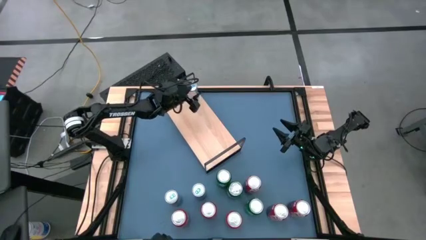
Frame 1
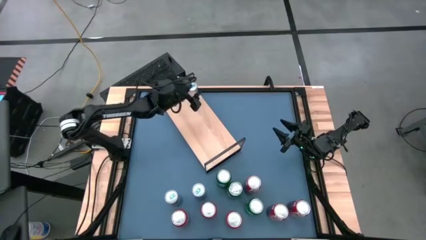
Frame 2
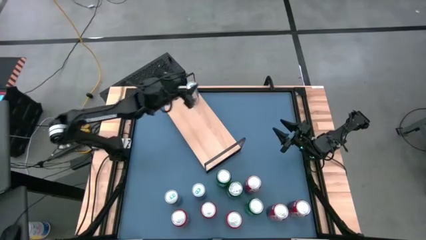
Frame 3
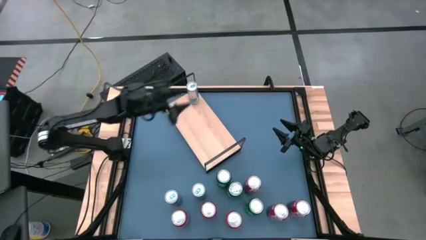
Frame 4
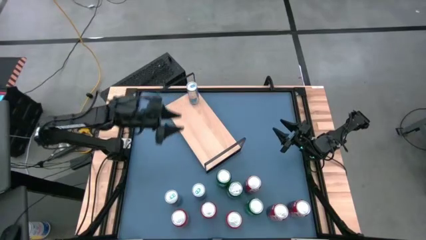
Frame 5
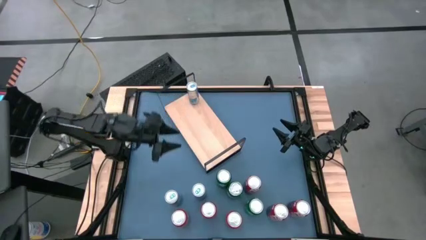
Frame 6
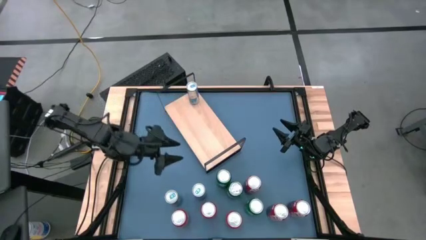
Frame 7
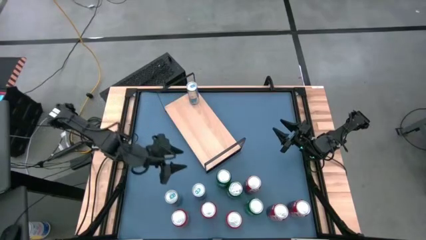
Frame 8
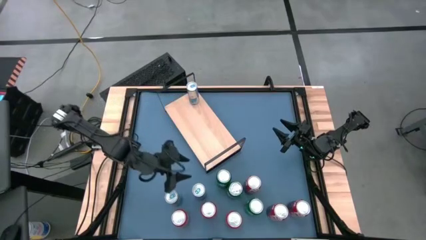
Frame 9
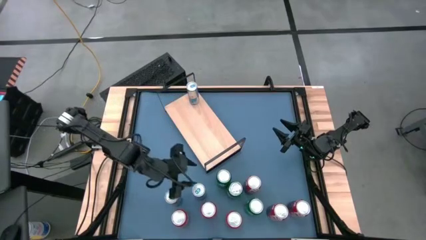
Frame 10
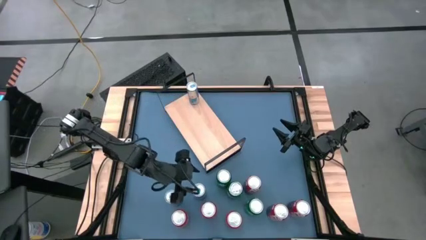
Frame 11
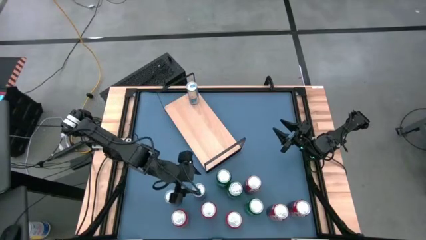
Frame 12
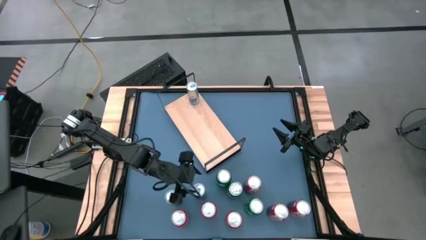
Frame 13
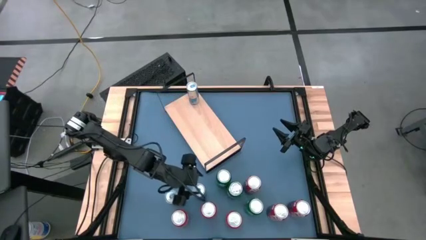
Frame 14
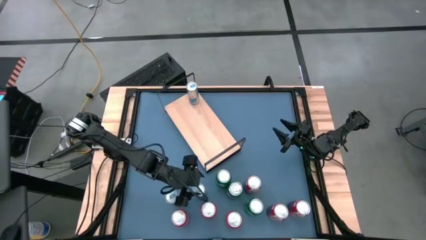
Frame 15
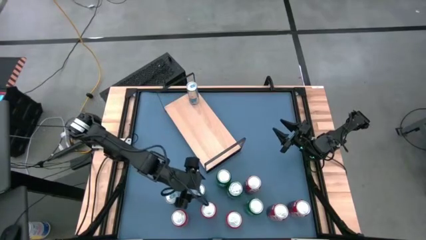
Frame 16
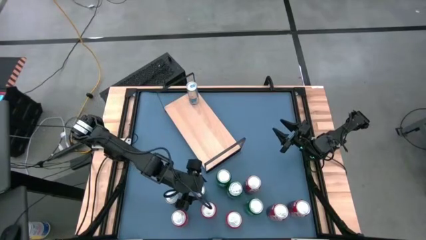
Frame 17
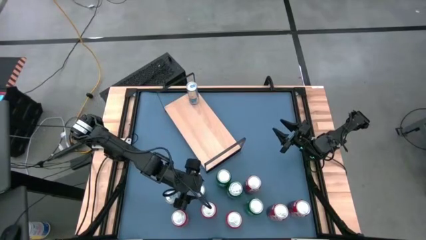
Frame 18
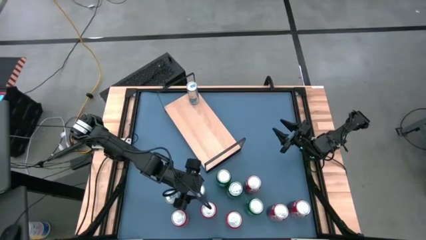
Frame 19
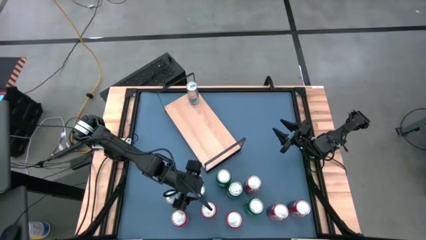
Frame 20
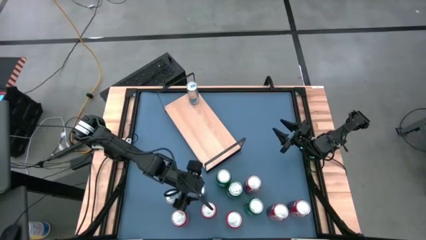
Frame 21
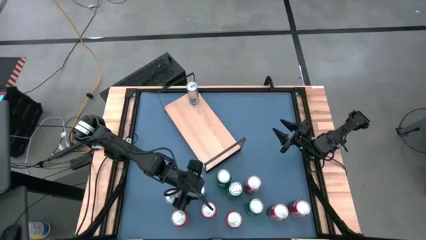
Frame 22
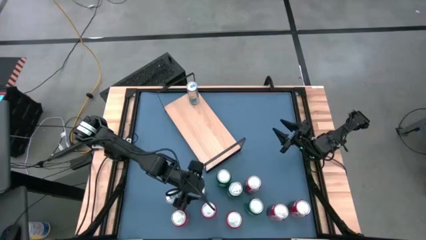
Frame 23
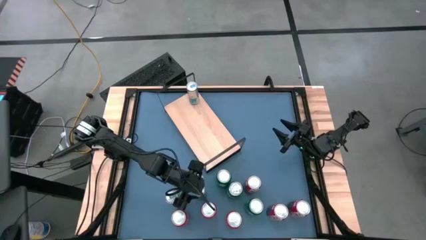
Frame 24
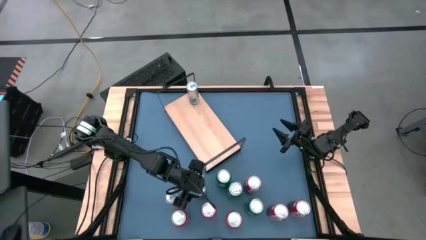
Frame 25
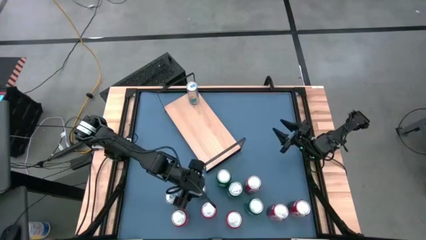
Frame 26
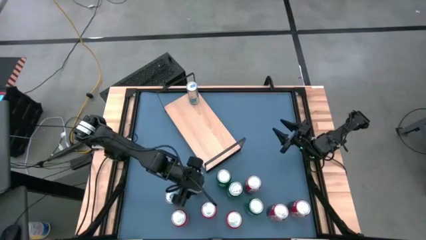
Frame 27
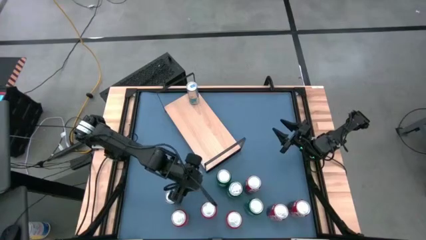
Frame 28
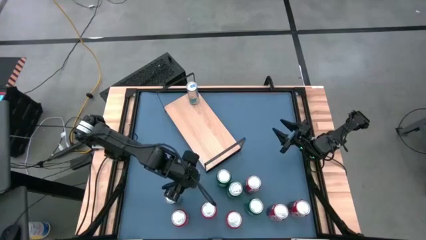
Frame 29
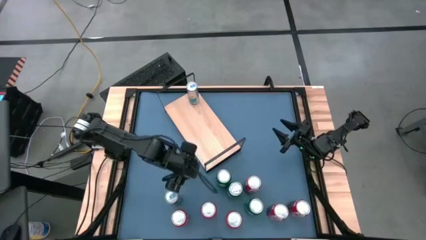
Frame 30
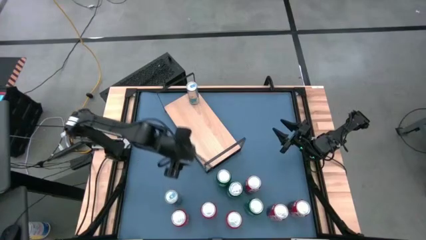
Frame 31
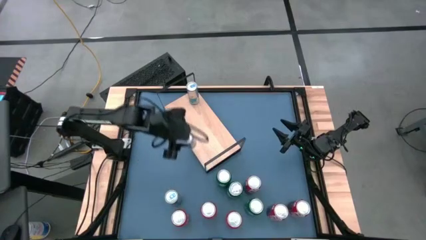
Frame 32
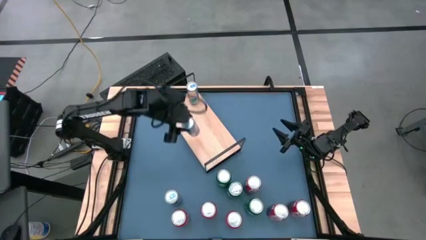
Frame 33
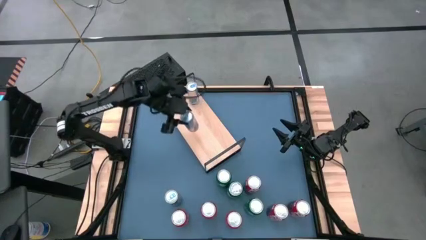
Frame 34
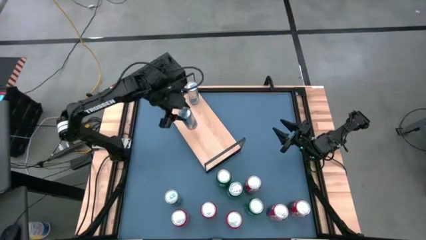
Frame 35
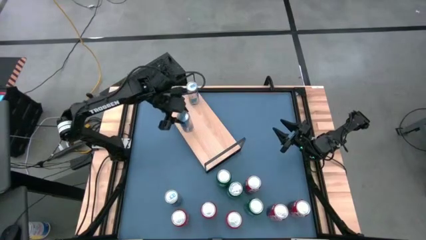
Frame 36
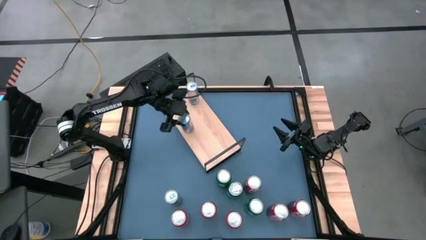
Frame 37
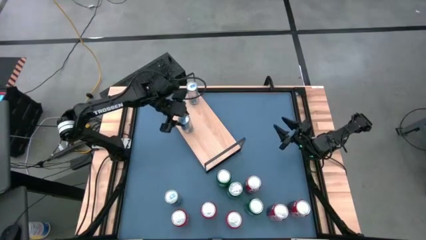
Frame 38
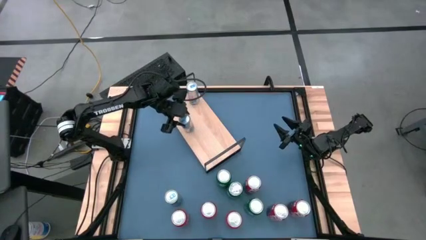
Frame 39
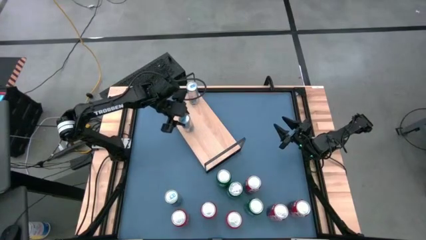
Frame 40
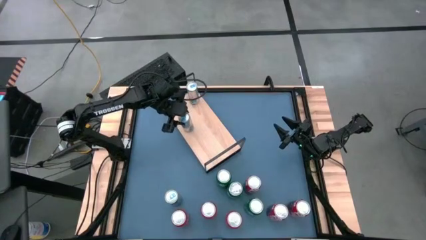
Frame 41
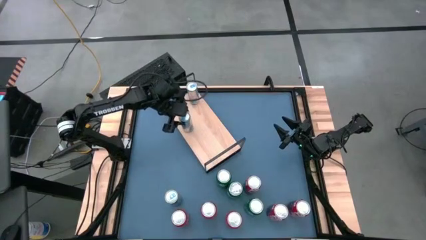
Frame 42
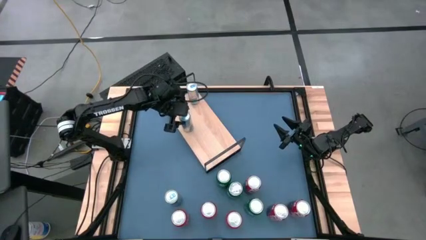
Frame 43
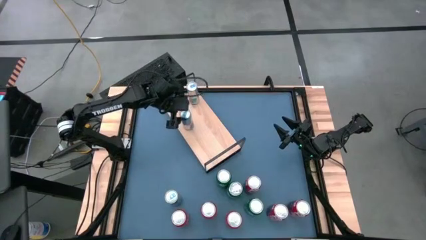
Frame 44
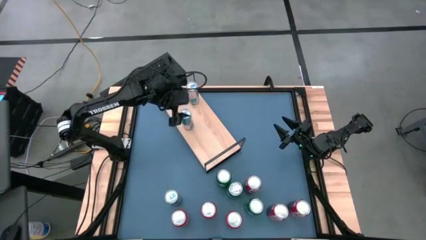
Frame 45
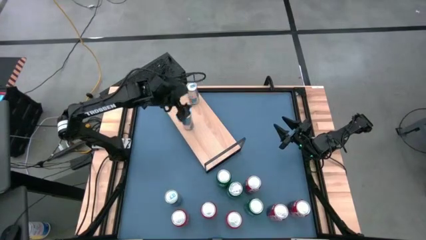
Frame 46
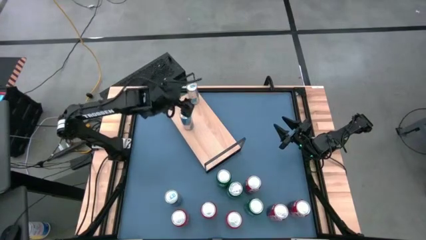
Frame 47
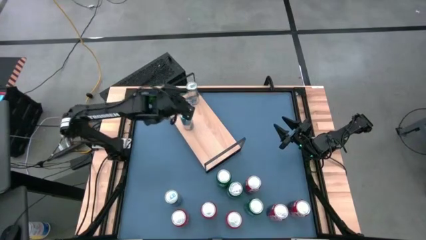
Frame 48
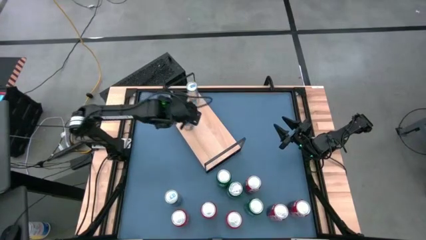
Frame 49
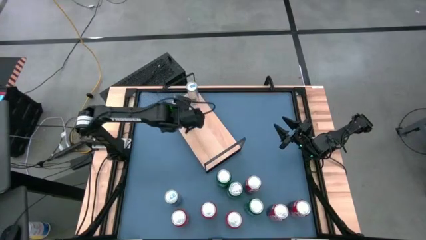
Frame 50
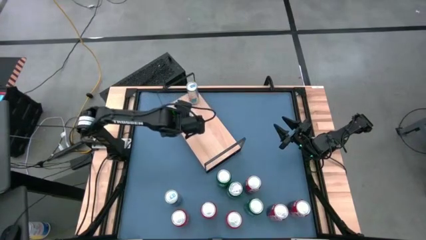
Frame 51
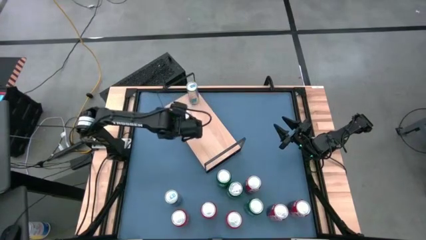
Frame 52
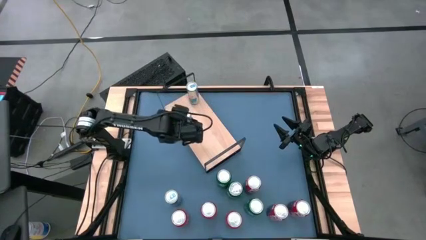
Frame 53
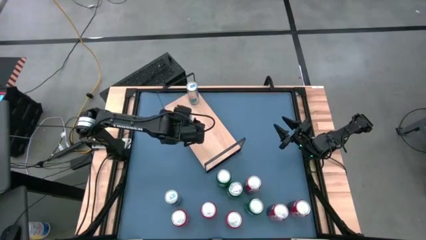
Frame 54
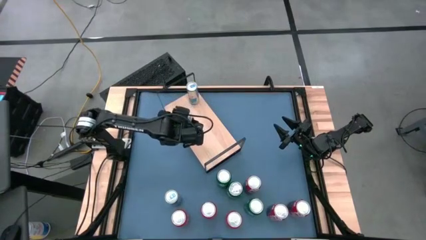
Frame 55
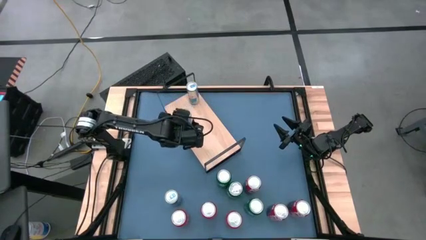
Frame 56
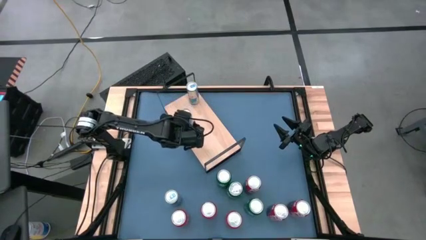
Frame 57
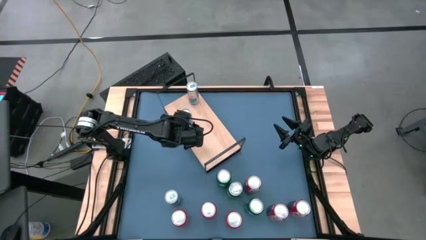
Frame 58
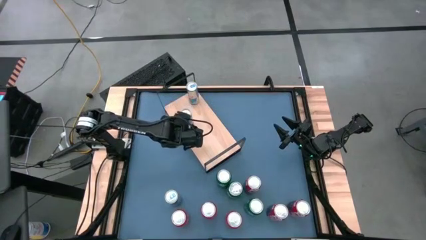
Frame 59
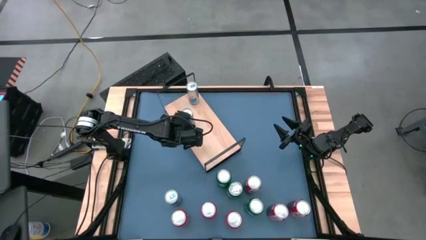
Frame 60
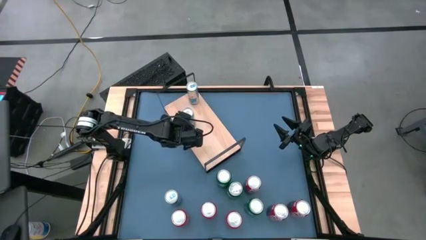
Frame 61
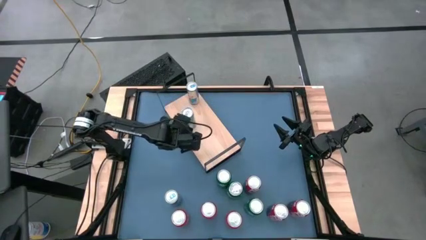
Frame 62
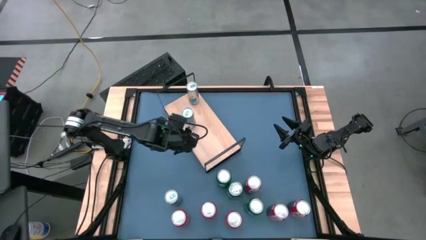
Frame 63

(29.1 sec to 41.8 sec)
Task: Place canned beverage on shelf
Put the right blue soda can on the shelf aligned with the other blue soda can
